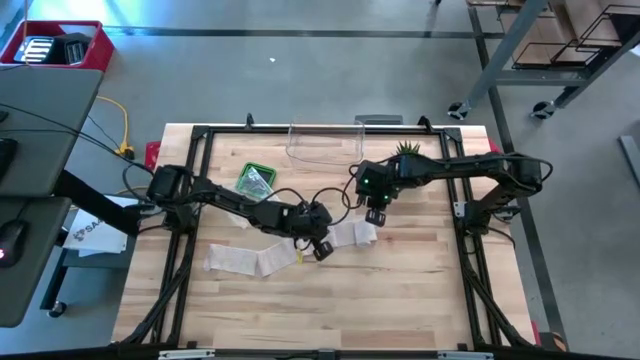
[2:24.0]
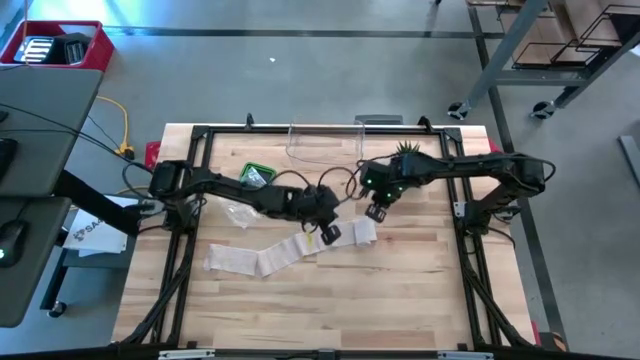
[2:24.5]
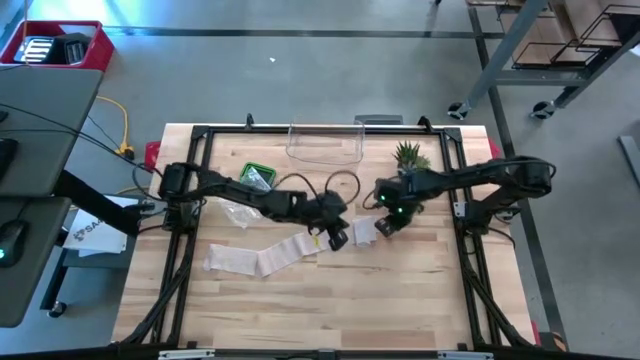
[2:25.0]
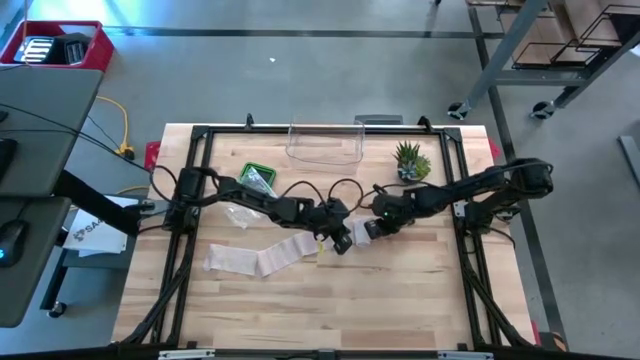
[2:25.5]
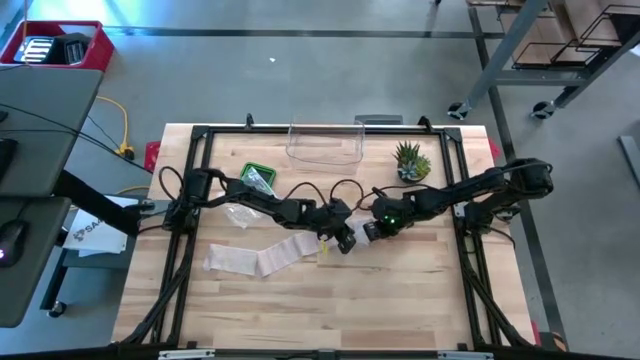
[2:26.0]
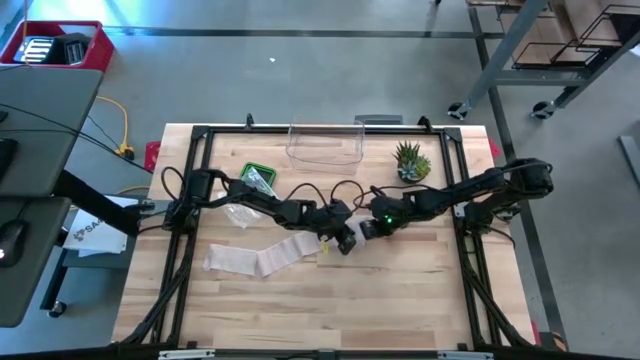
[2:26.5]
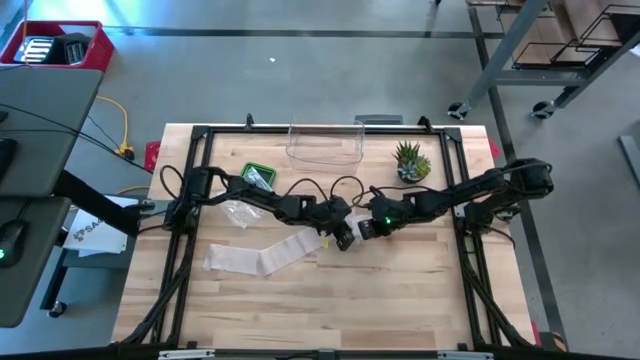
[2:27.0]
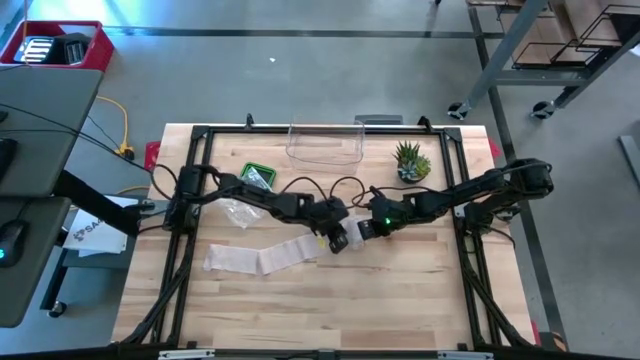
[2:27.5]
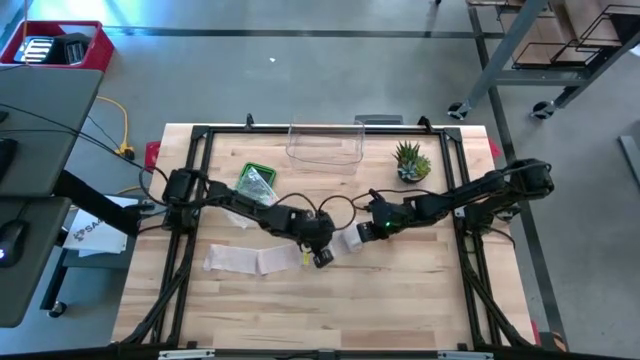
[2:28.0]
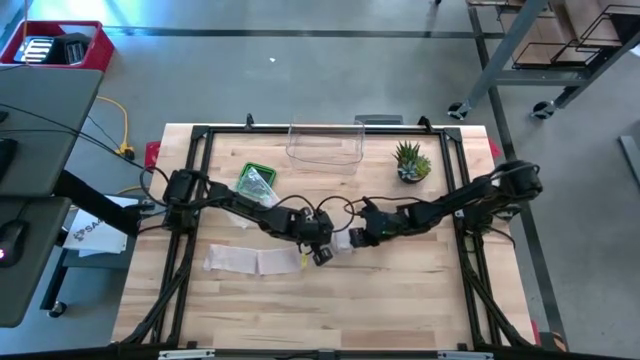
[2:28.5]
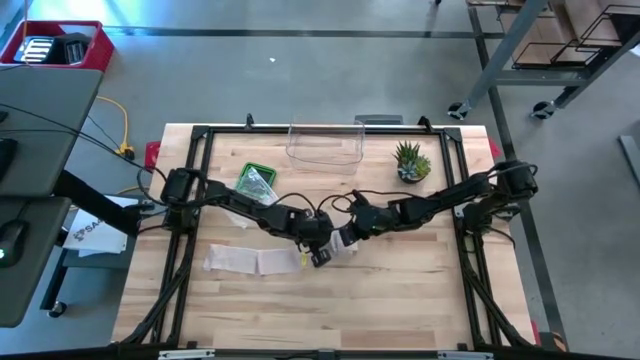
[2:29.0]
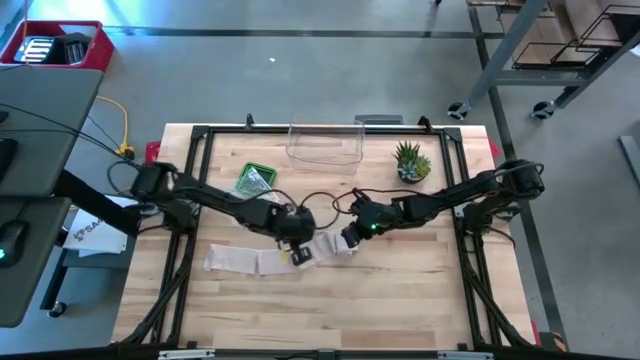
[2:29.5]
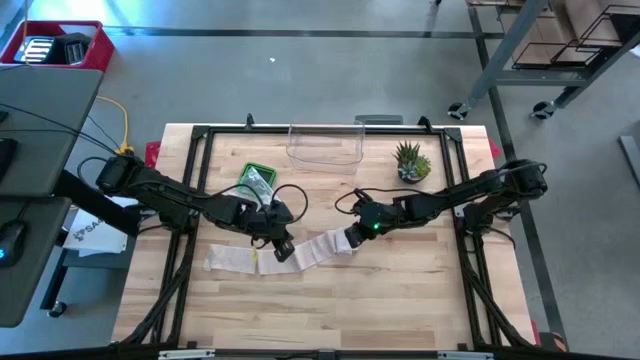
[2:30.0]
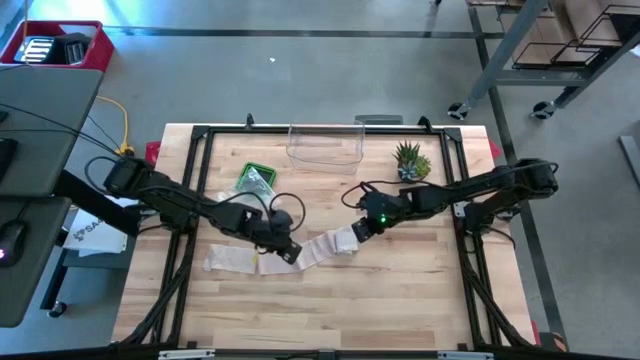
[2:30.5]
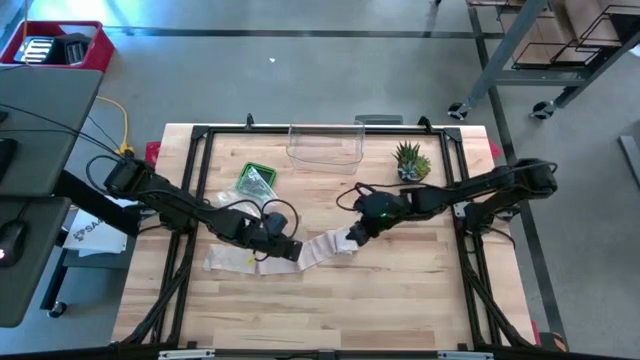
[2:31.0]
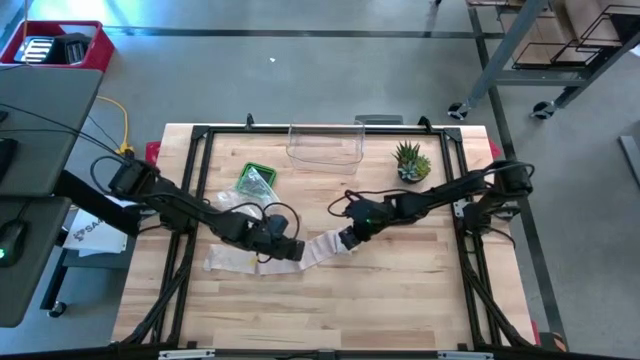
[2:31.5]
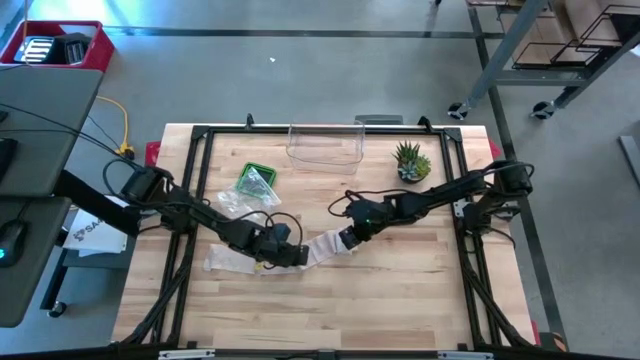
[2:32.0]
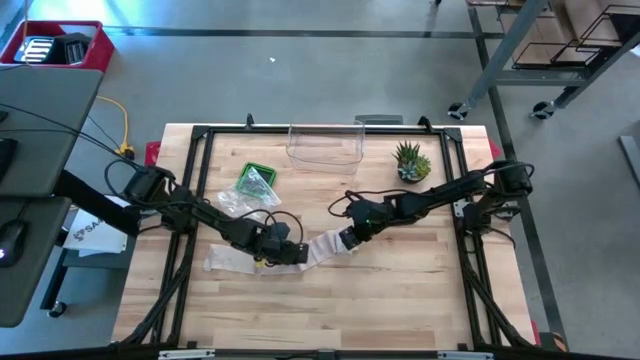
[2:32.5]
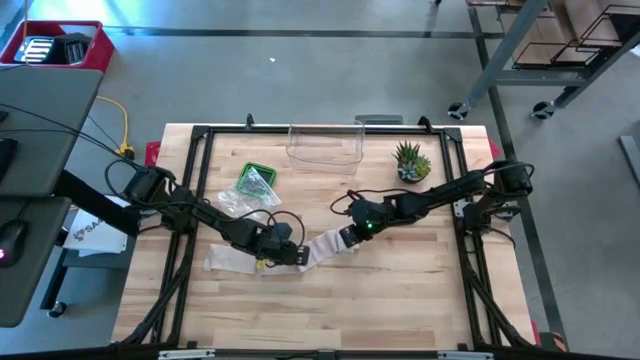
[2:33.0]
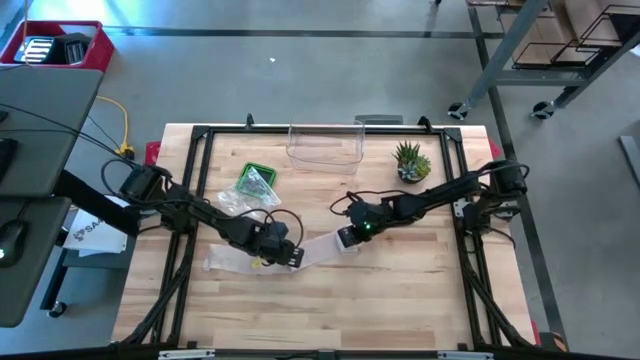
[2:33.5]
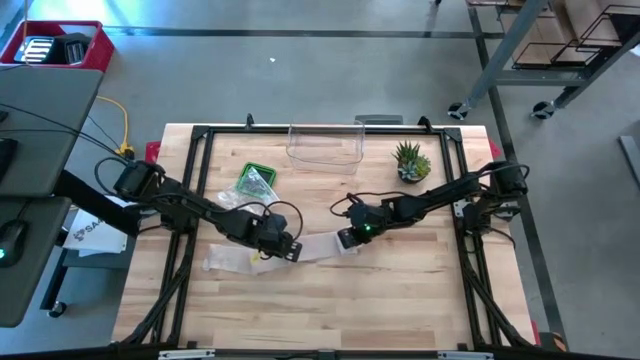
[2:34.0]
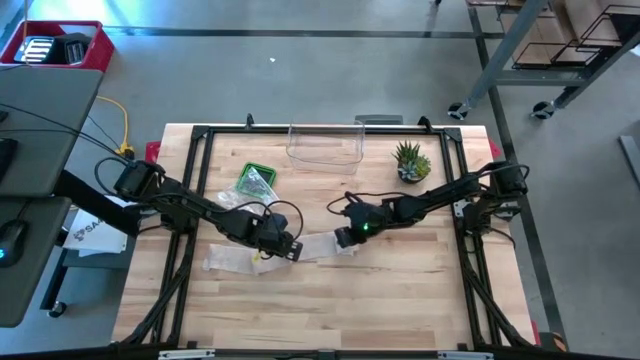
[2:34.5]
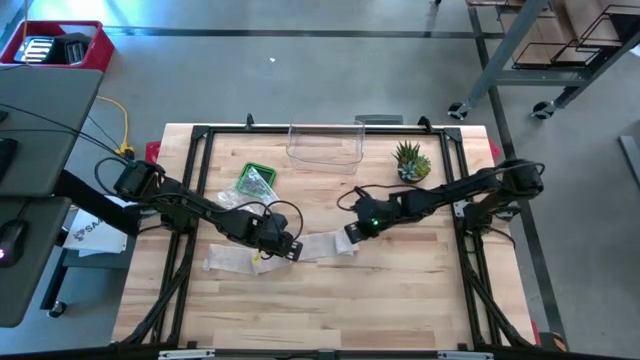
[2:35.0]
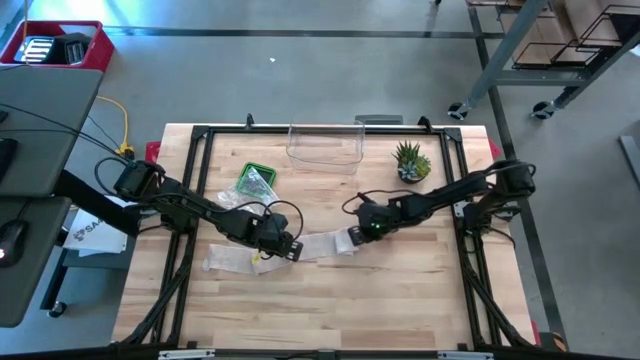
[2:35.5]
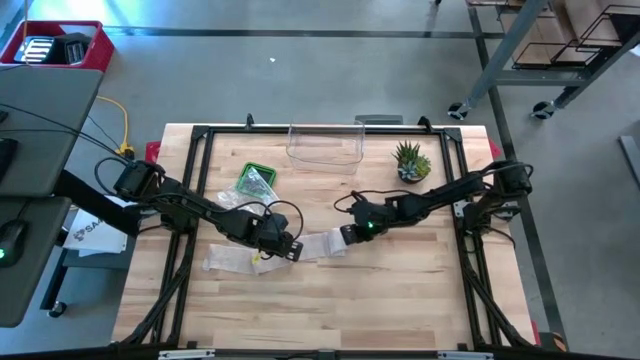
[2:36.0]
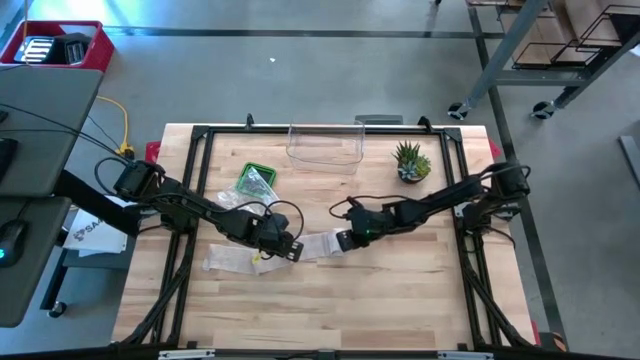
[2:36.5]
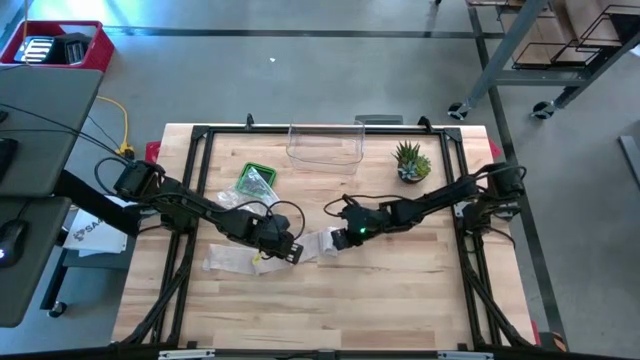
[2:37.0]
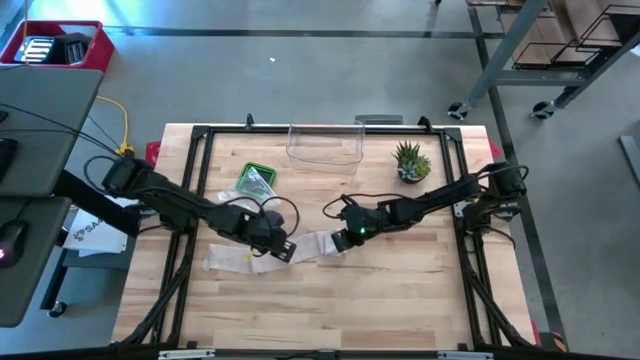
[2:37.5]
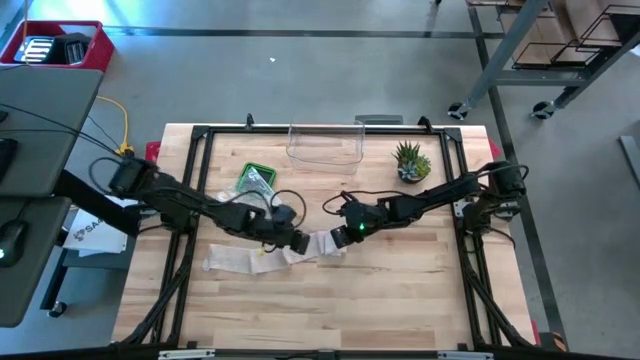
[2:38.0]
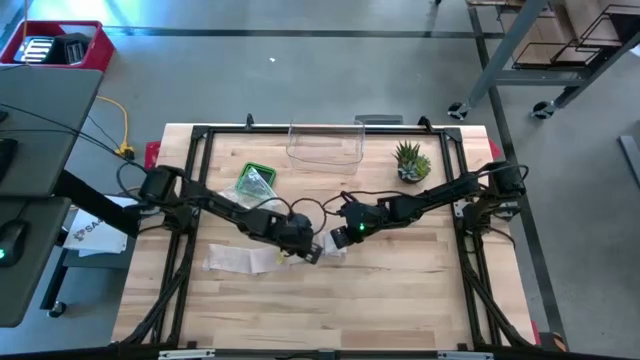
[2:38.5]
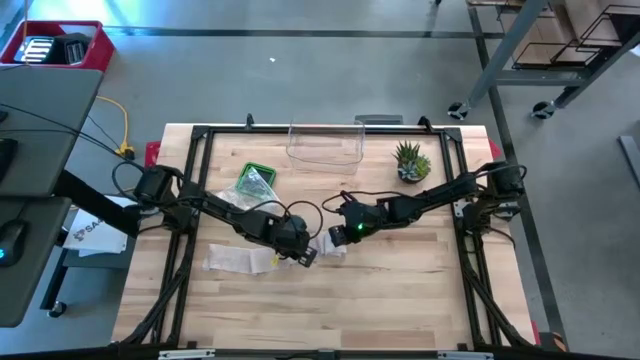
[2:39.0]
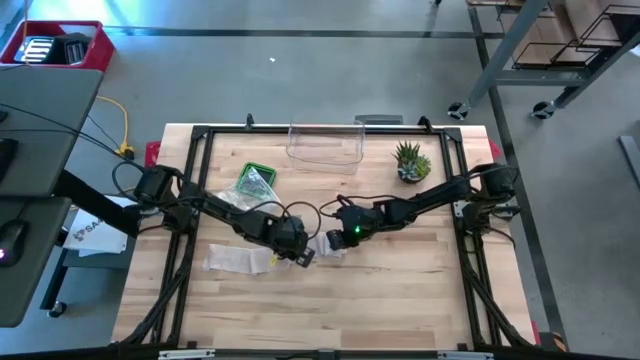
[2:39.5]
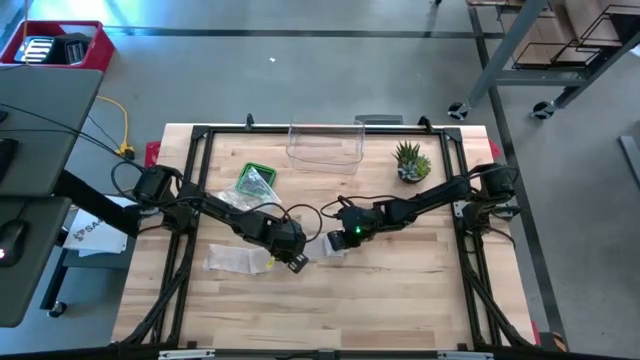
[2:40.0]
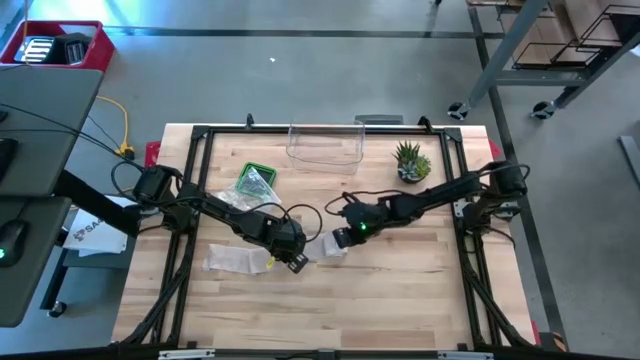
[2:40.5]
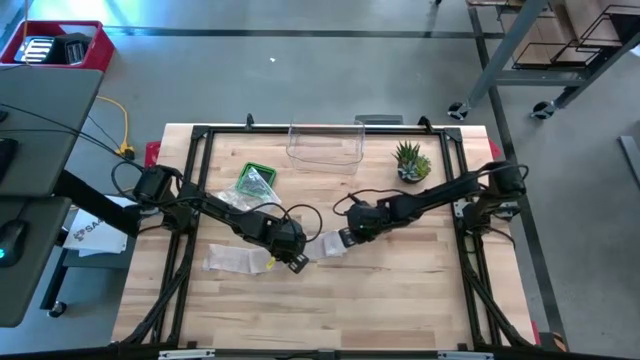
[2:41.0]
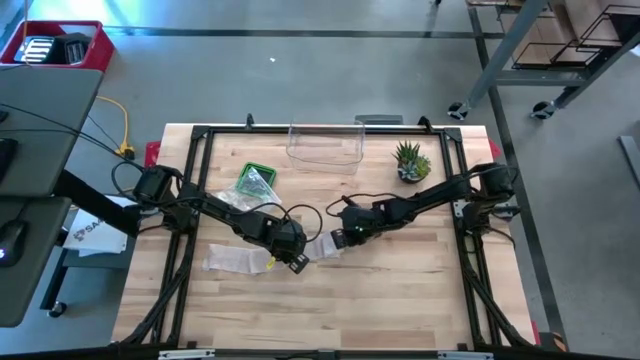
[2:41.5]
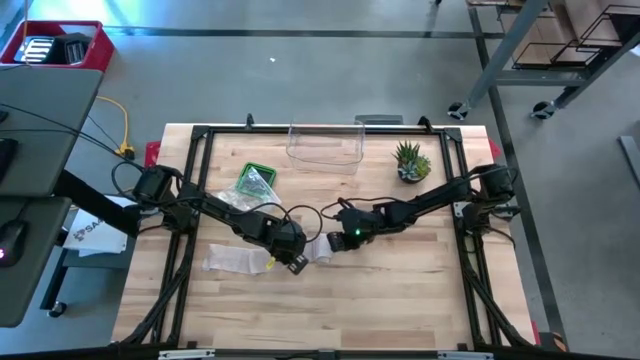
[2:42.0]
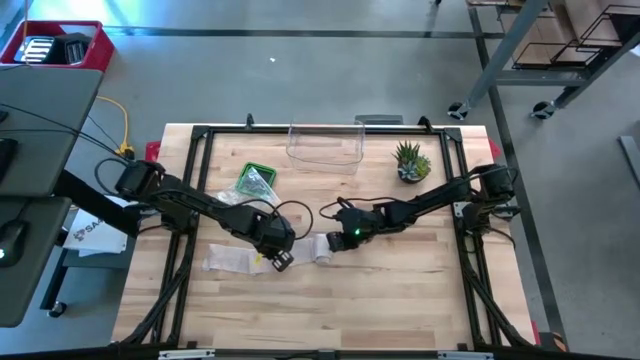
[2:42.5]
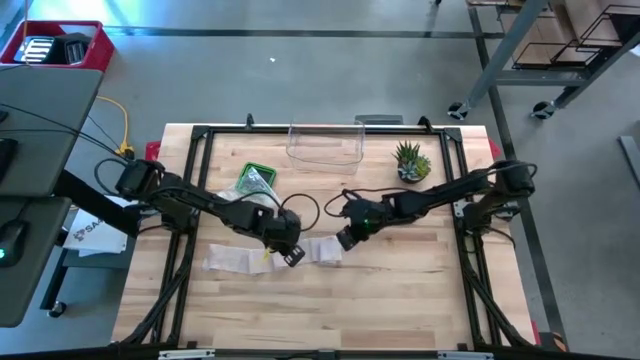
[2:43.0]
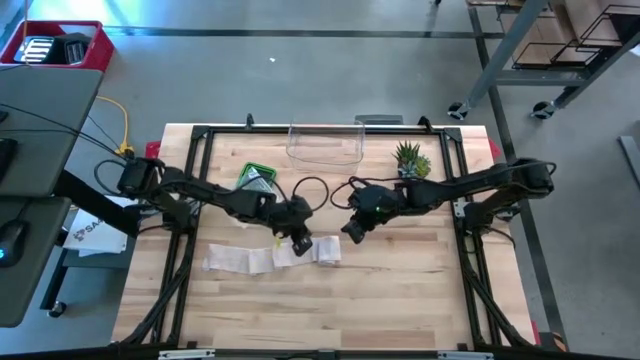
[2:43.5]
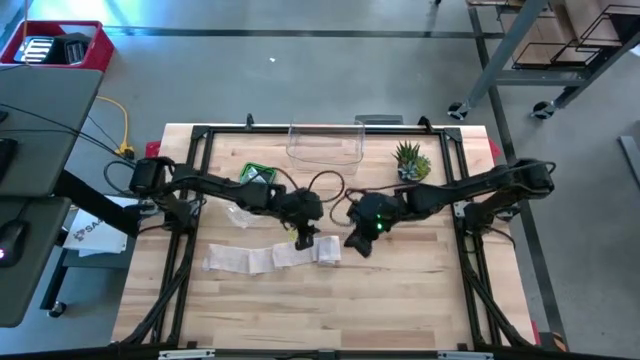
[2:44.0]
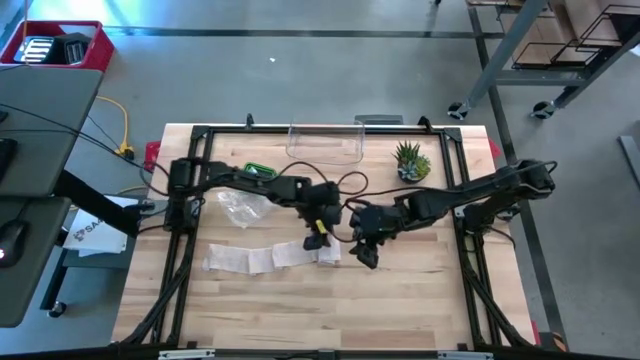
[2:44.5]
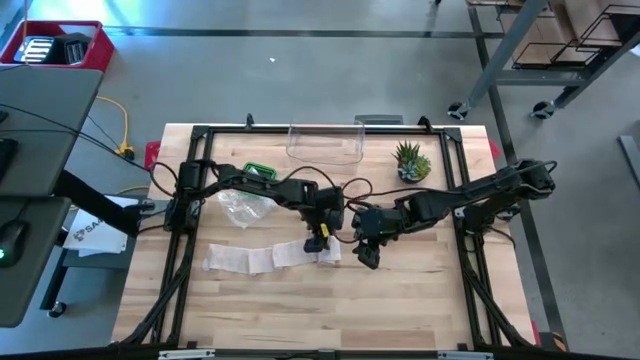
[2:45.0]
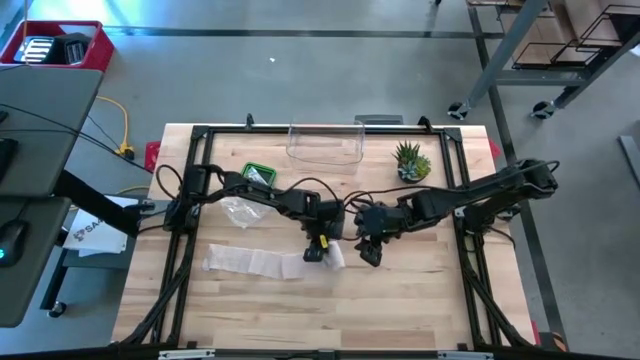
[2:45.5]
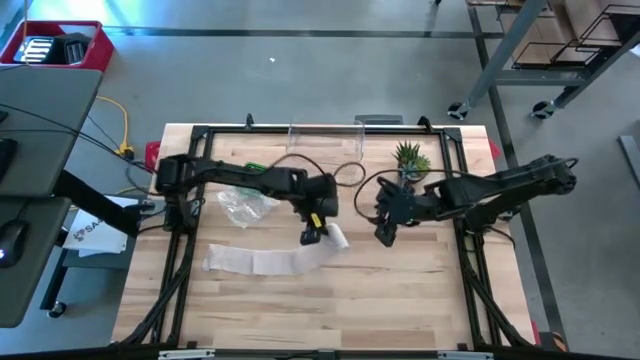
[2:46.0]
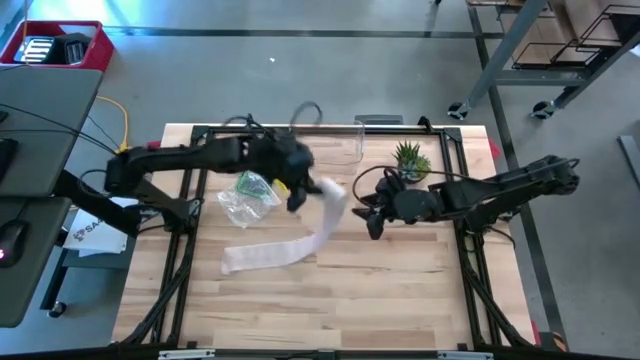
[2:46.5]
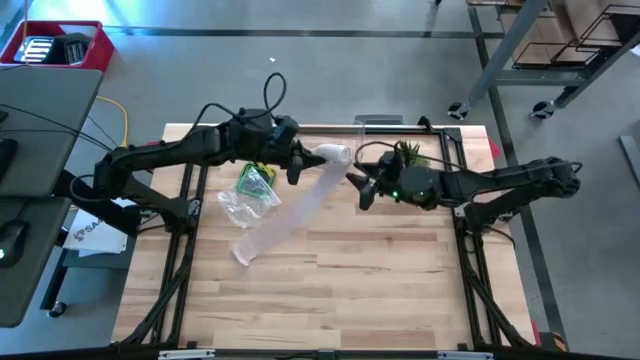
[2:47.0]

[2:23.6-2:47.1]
Task: Roll bandage
Roll the bandage
